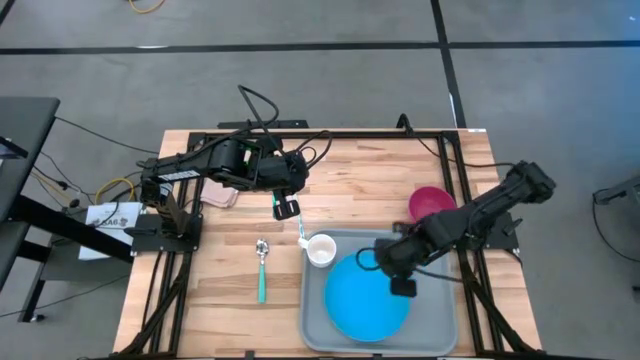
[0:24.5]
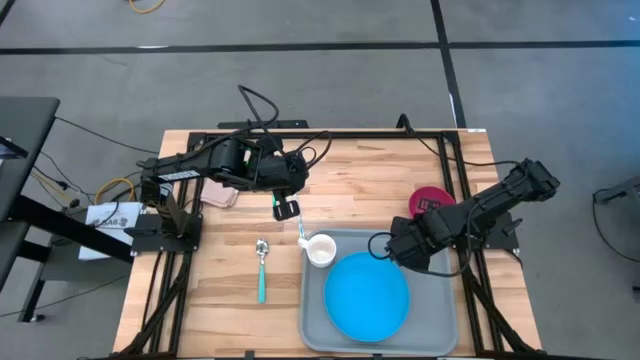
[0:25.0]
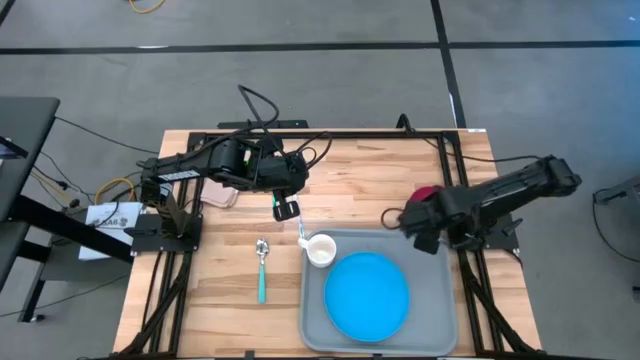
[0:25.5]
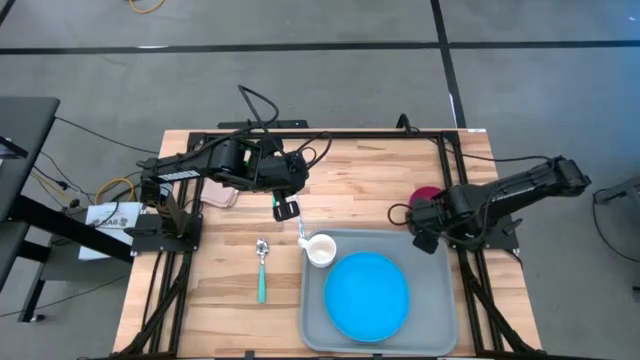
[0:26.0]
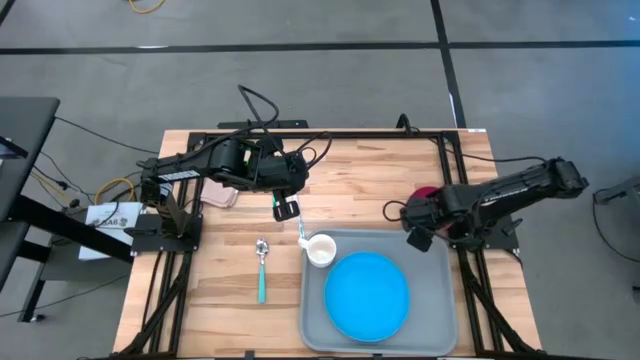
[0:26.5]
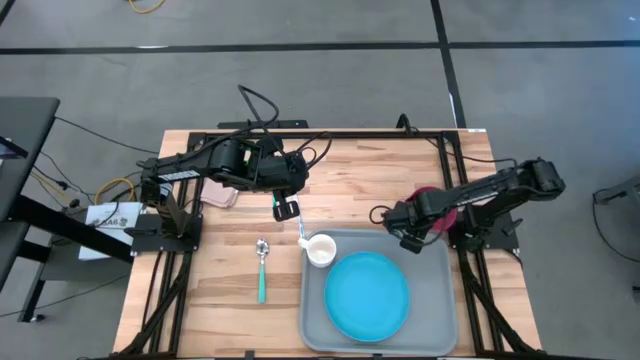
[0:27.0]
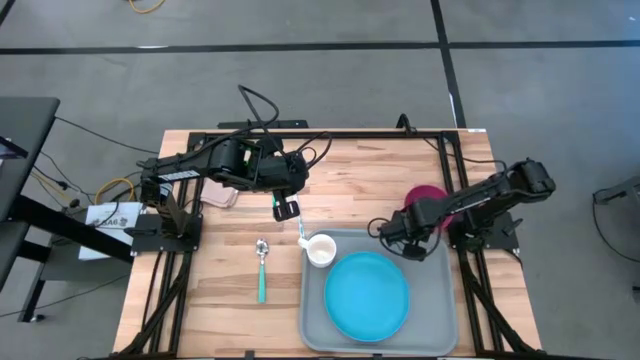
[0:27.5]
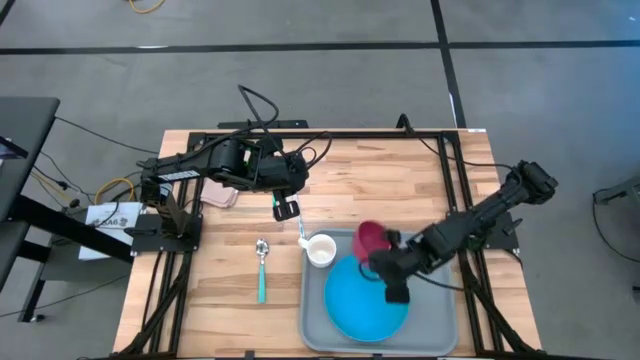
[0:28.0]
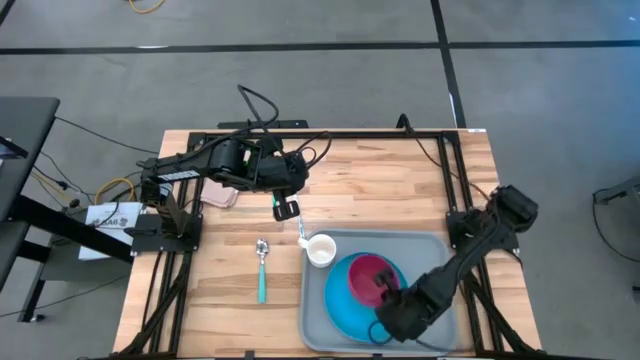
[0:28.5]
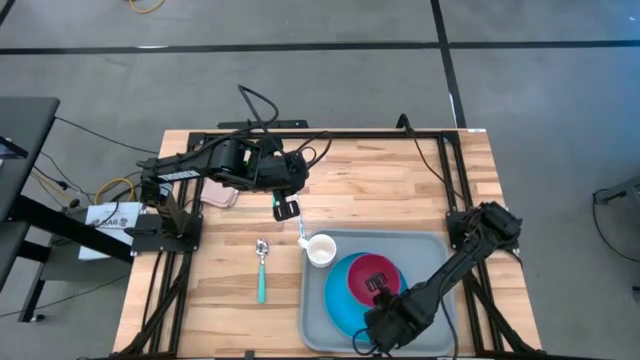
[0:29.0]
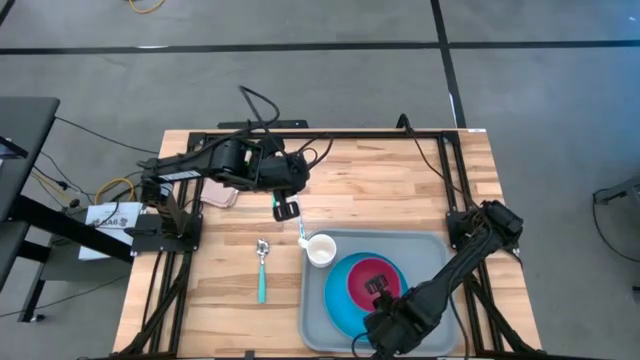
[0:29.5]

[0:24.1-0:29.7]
Task: Set up tray
Put the red bowl on the blue plate

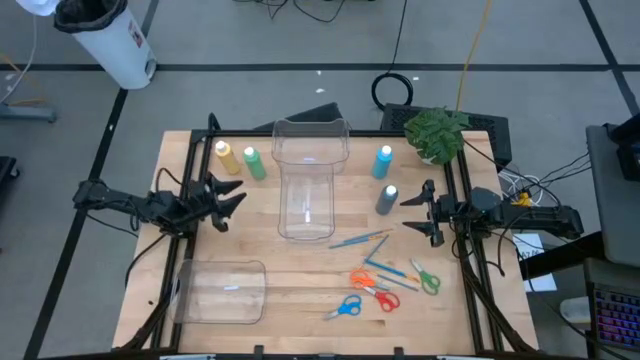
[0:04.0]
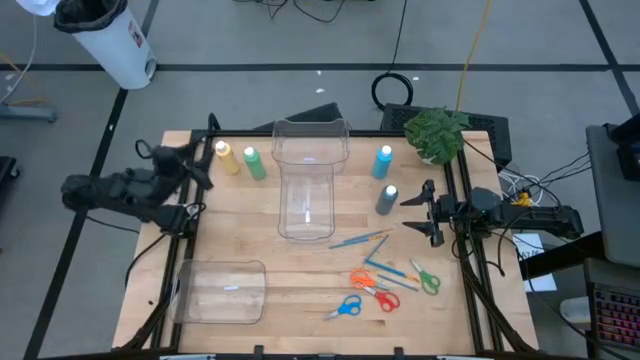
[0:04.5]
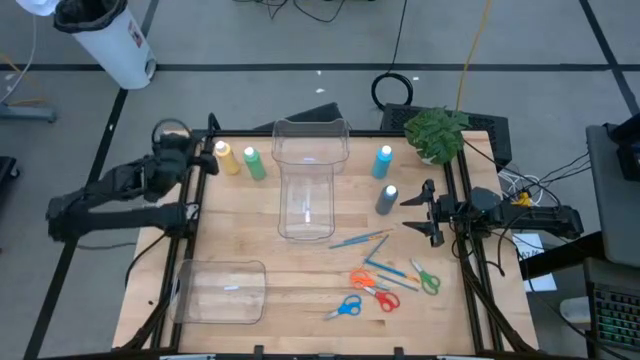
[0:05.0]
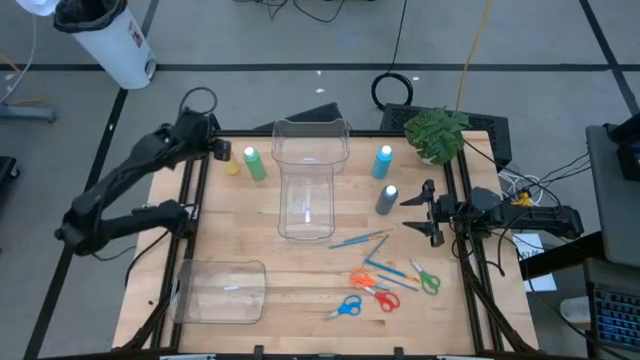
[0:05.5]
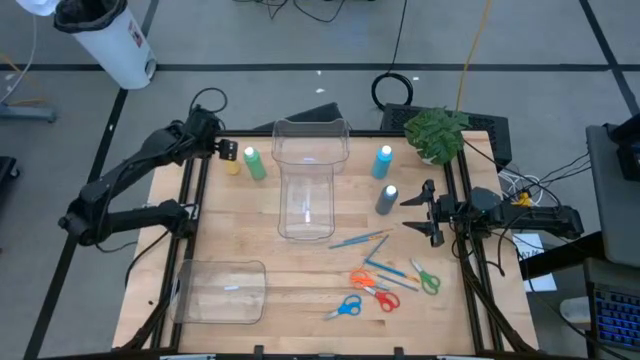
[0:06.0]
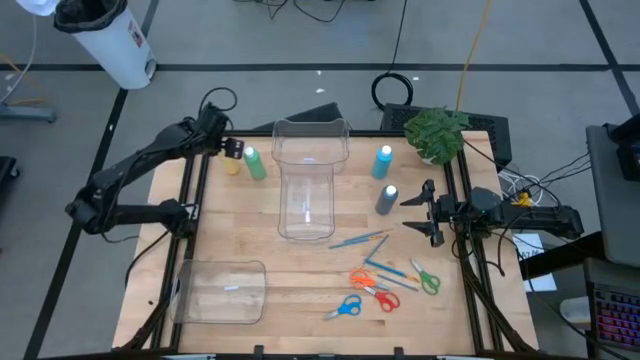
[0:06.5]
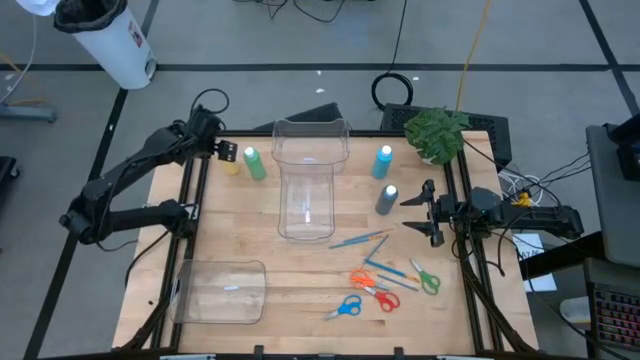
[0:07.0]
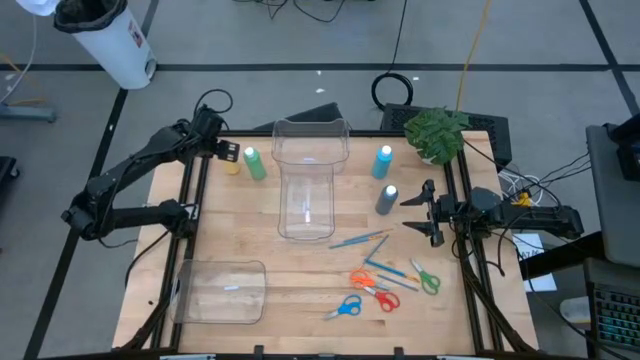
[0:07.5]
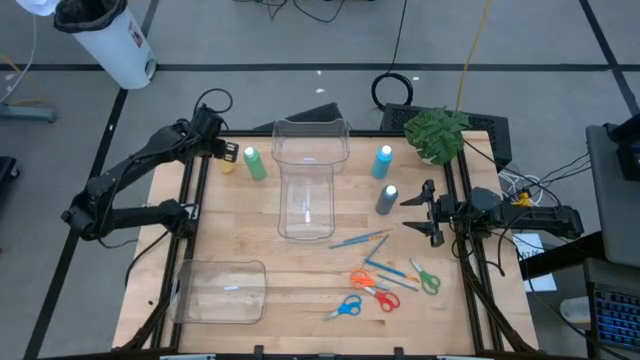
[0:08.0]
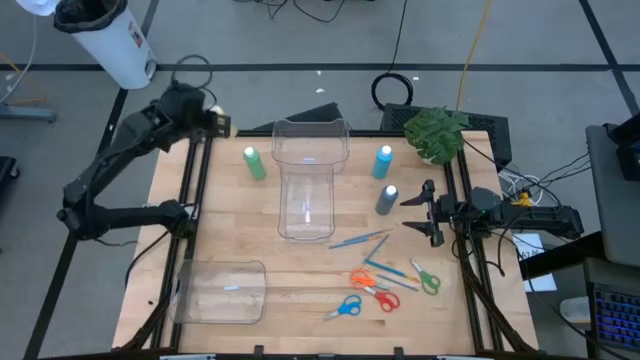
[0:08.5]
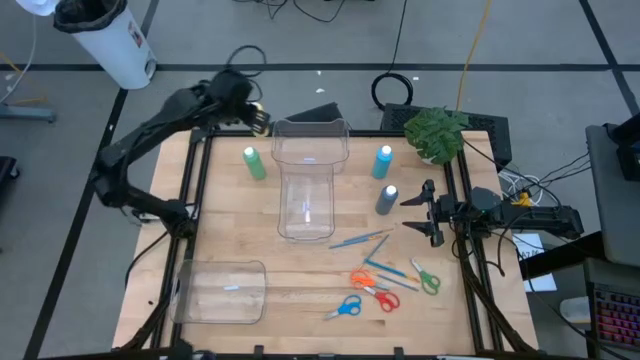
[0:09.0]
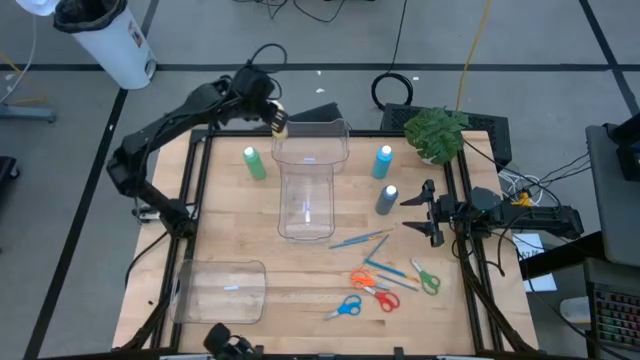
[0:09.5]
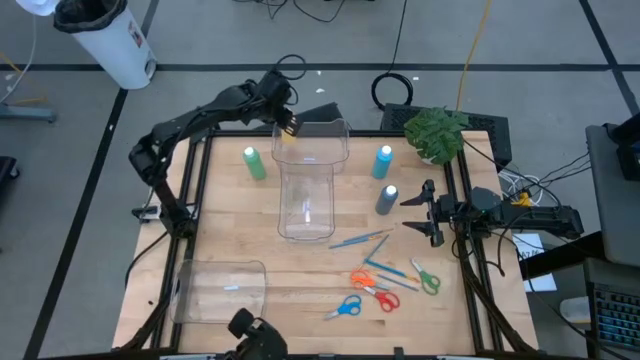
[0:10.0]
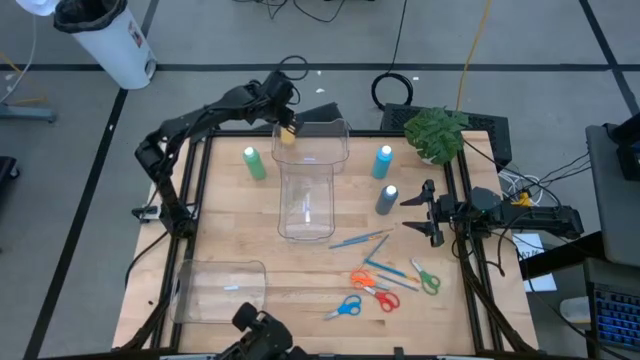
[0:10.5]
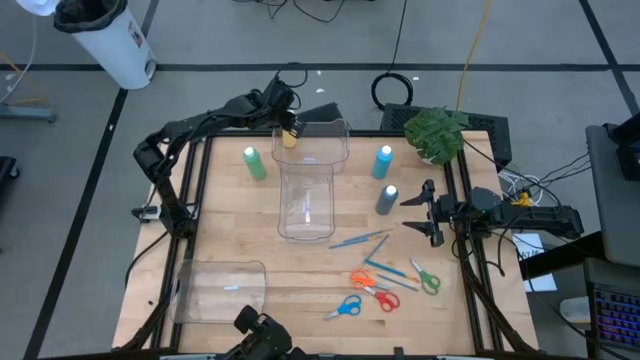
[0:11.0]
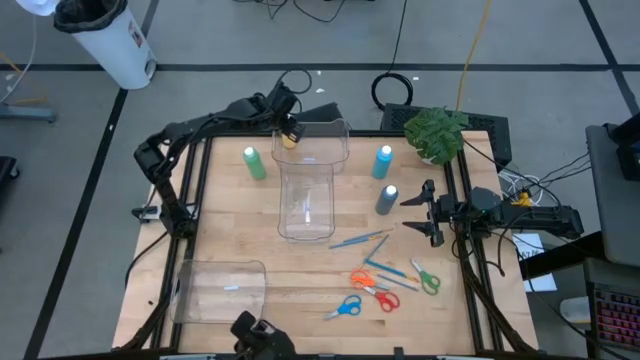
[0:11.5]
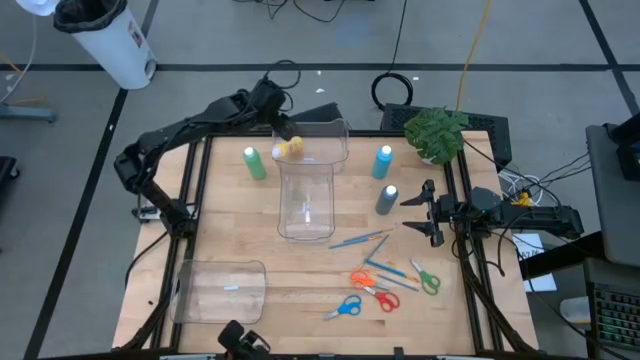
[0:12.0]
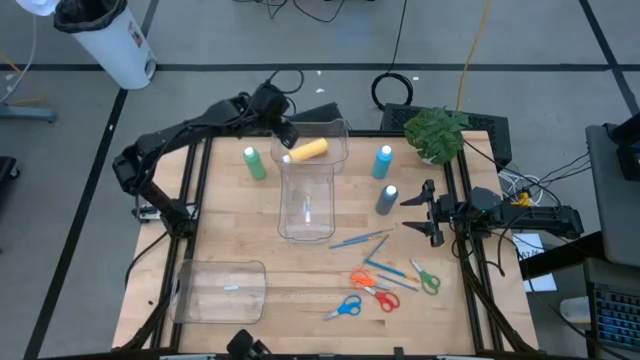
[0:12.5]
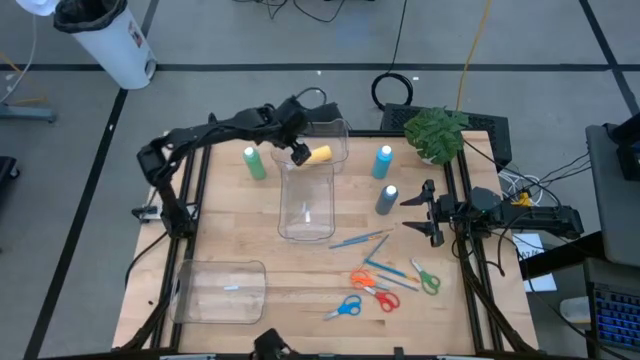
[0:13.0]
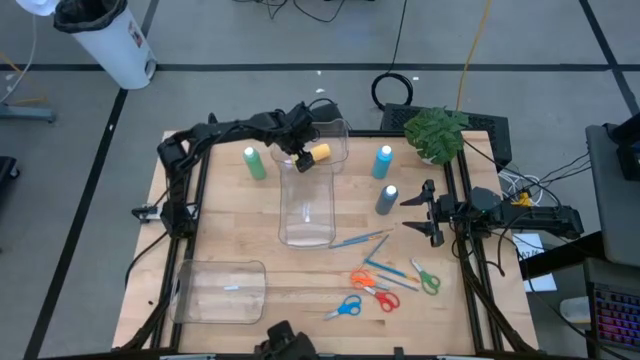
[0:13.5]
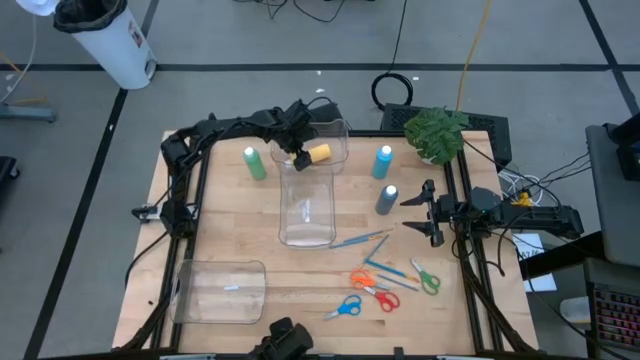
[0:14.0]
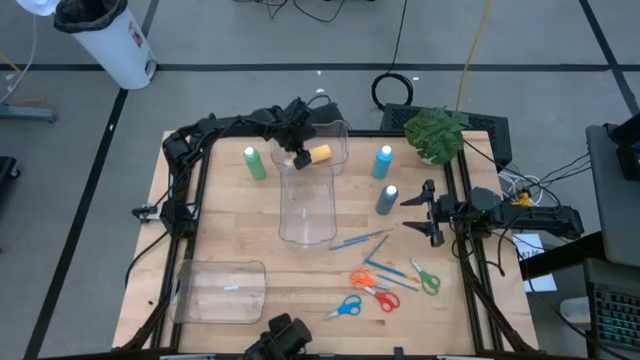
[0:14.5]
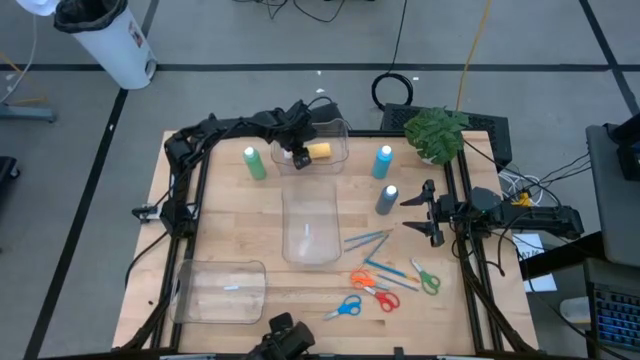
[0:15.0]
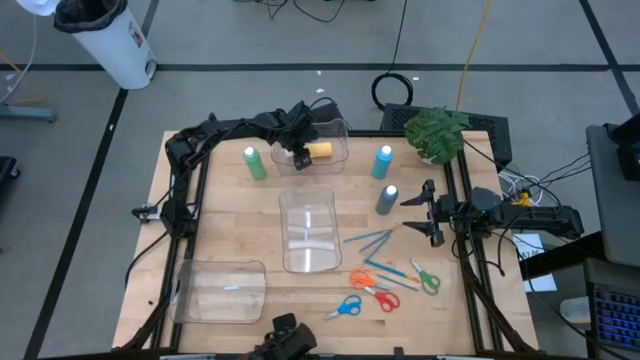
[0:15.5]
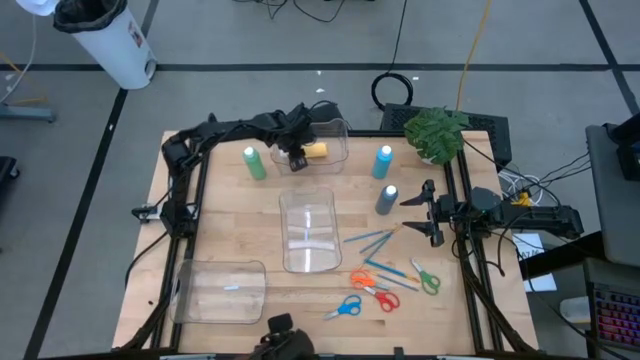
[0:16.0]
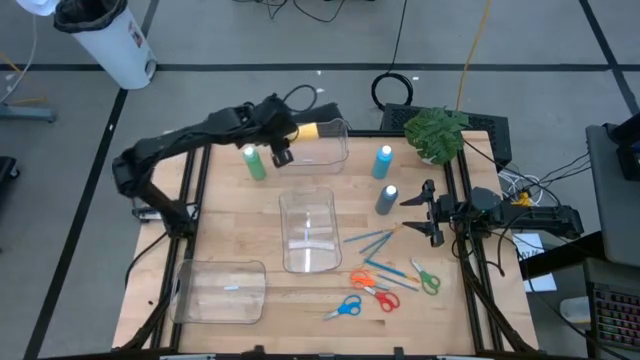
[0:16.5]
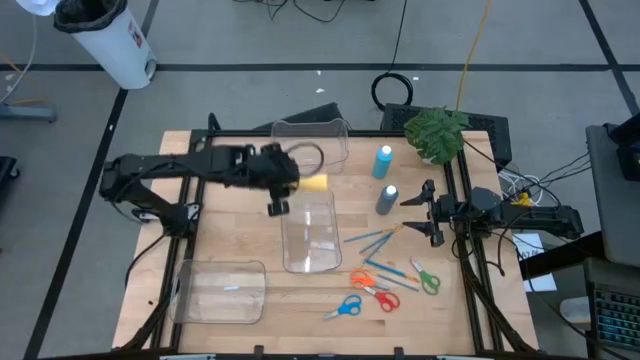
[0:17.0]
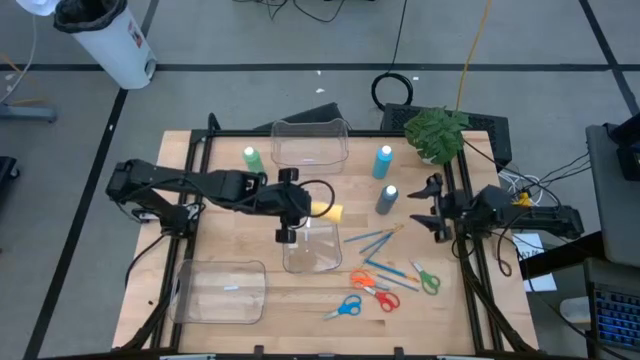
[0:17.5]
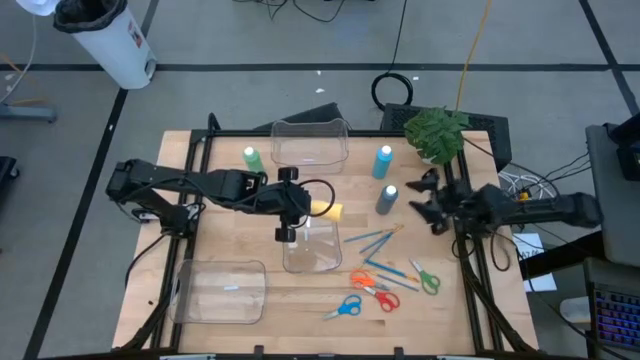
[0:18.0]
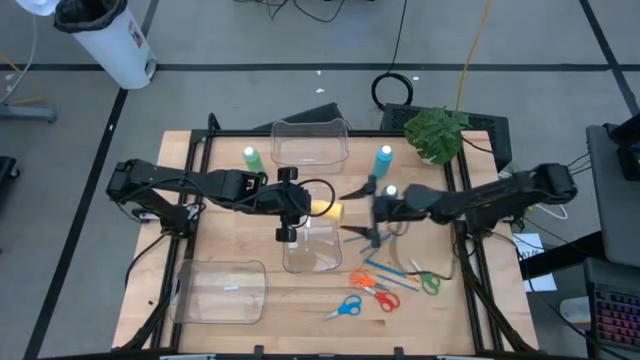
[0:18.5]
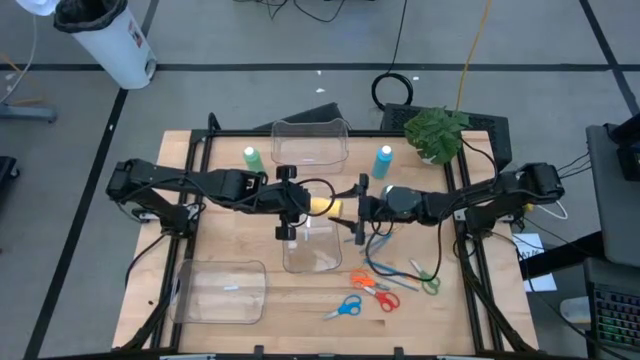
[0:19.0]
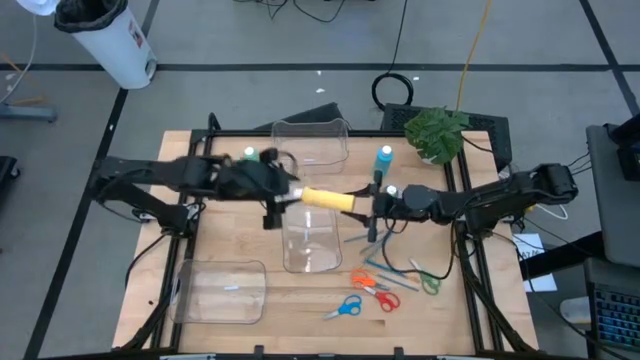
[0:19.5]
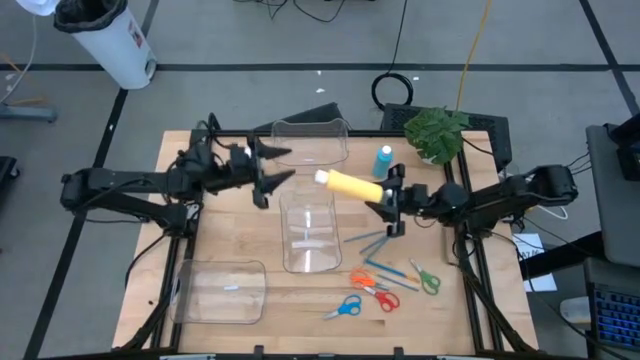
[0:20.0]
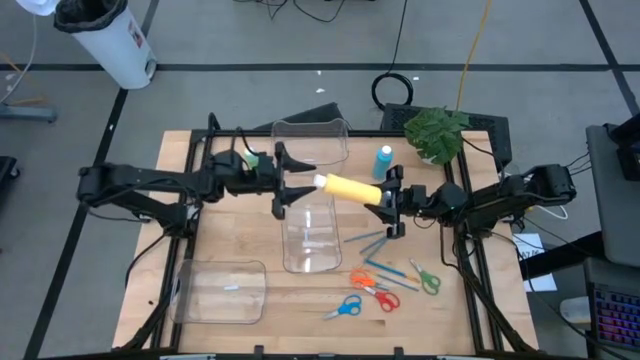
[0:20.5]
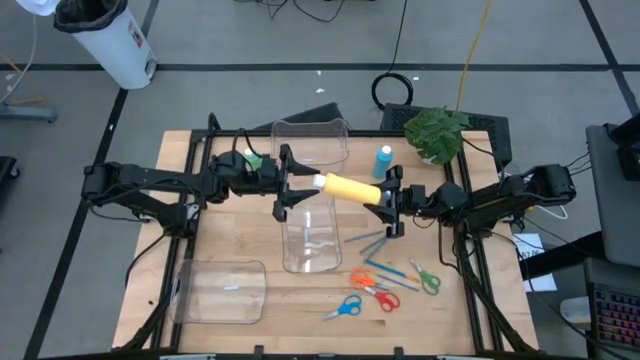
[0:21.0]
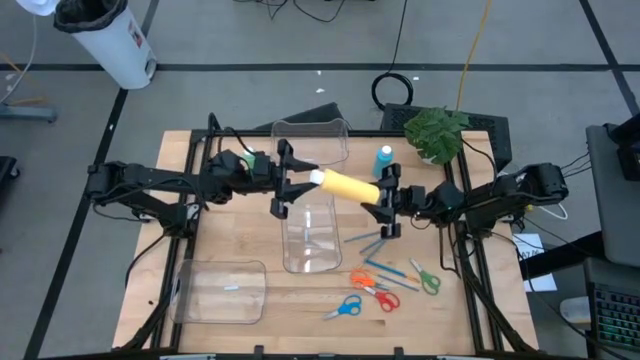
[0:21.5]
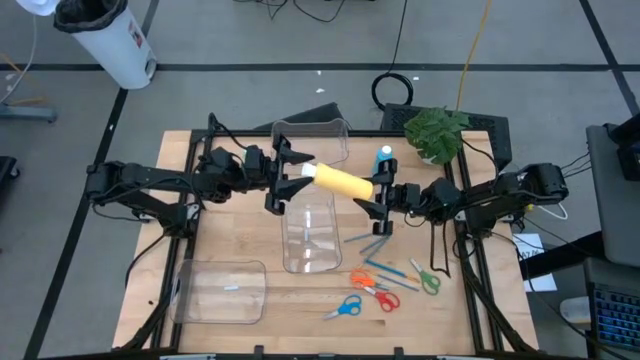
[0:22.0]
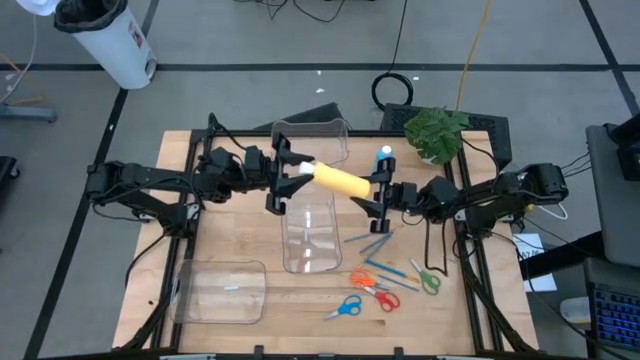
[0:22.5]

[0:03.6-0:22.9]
Task: Pick & Place Paint Supplies
Put the yellow paint bottle into the top transparent bin
